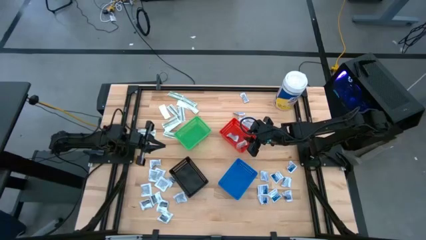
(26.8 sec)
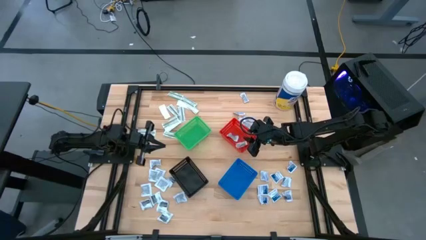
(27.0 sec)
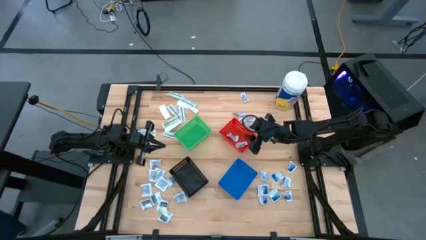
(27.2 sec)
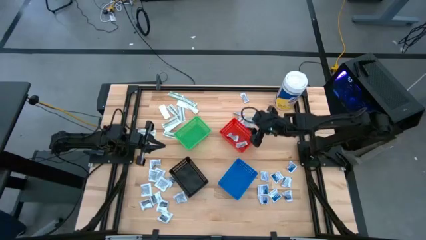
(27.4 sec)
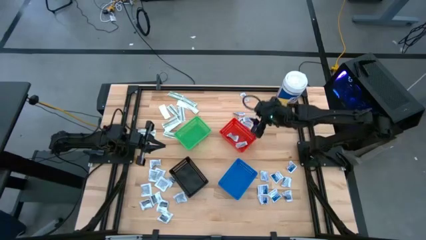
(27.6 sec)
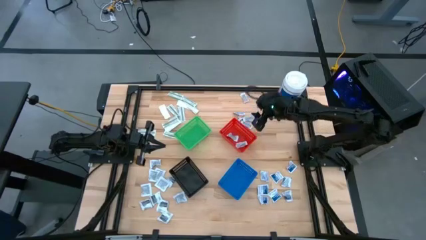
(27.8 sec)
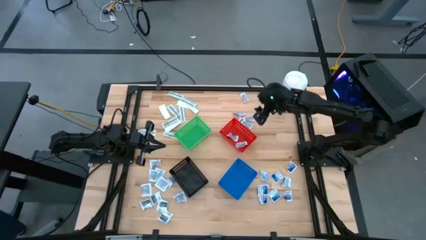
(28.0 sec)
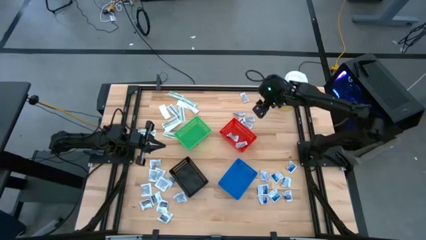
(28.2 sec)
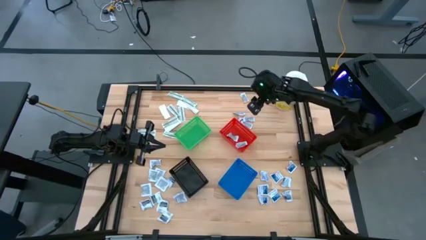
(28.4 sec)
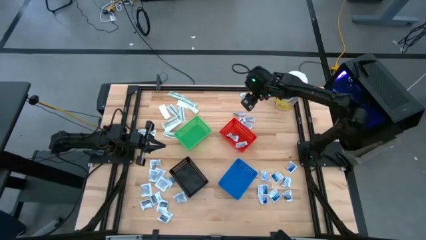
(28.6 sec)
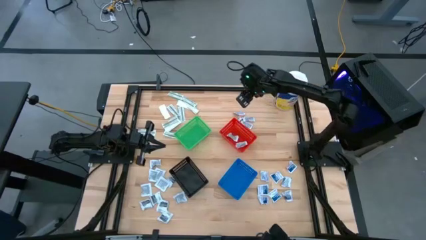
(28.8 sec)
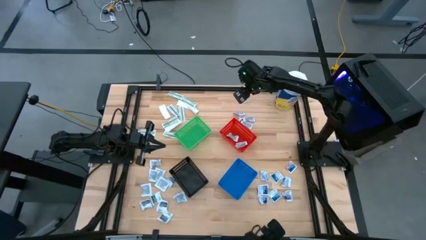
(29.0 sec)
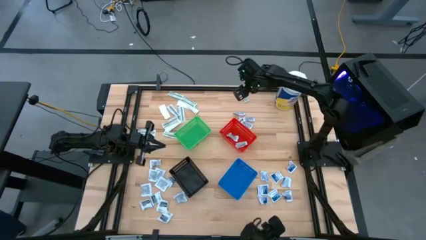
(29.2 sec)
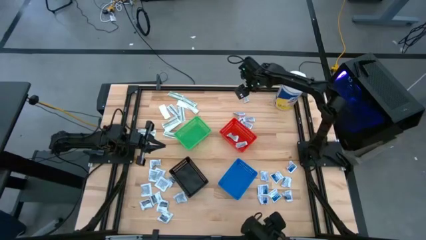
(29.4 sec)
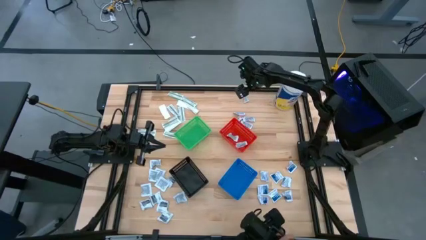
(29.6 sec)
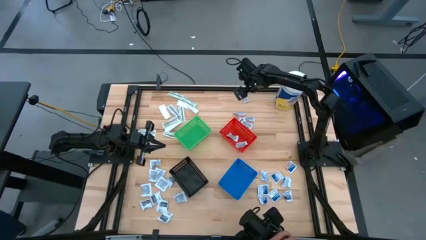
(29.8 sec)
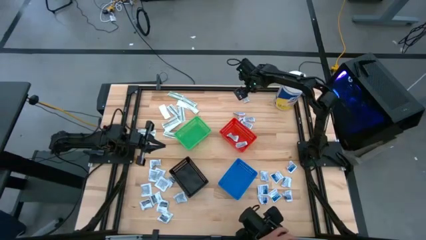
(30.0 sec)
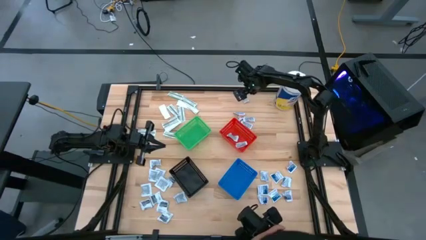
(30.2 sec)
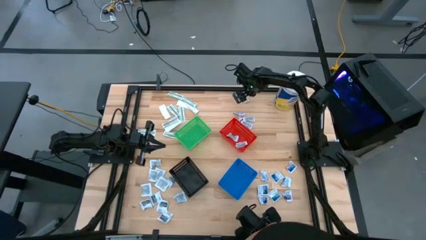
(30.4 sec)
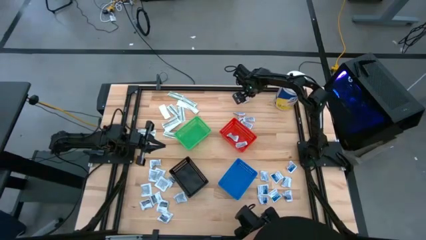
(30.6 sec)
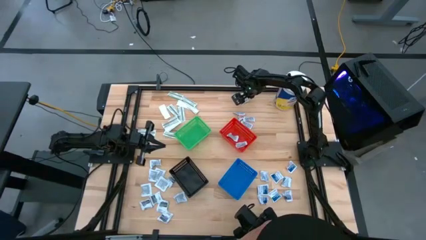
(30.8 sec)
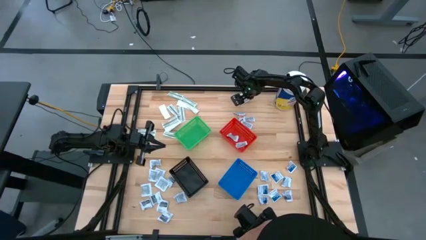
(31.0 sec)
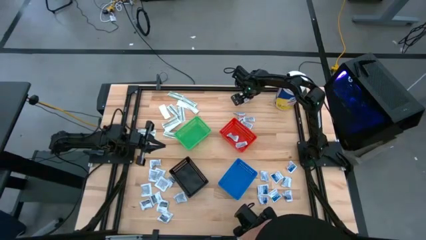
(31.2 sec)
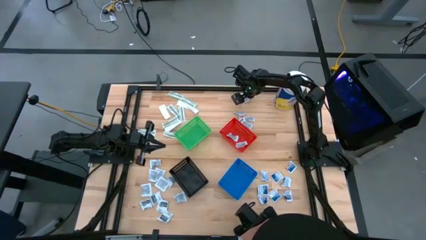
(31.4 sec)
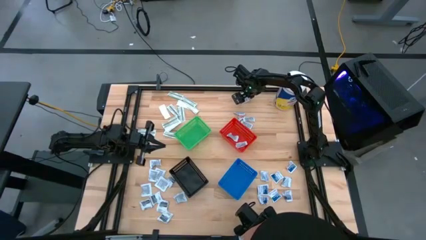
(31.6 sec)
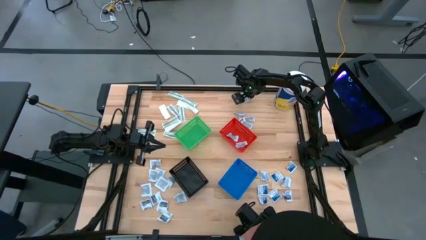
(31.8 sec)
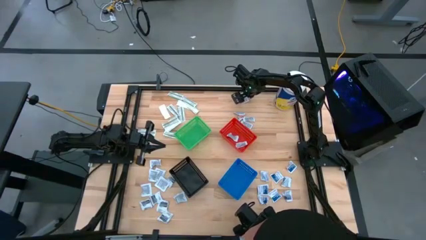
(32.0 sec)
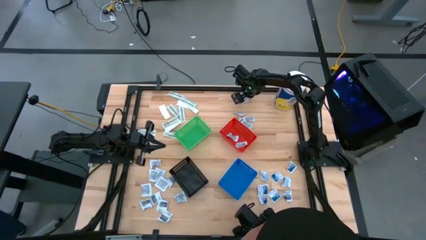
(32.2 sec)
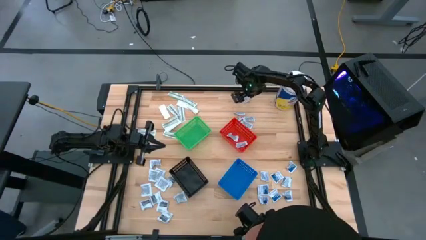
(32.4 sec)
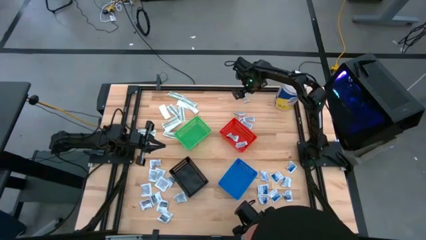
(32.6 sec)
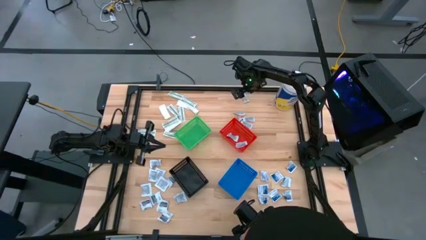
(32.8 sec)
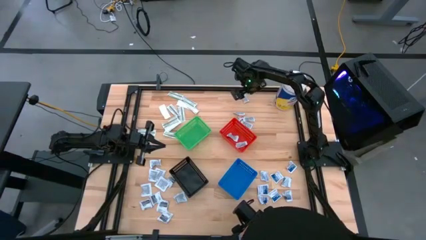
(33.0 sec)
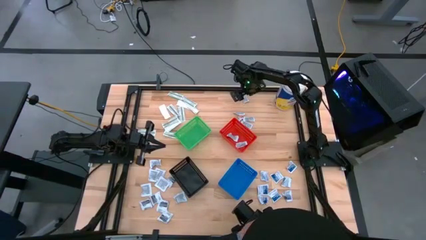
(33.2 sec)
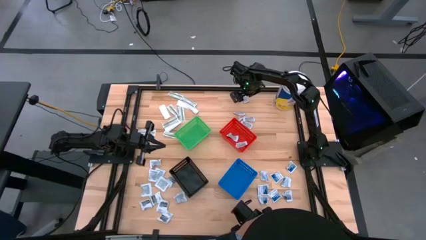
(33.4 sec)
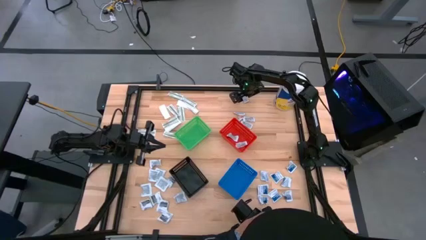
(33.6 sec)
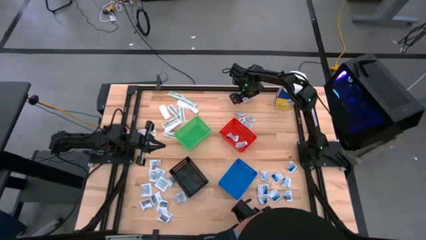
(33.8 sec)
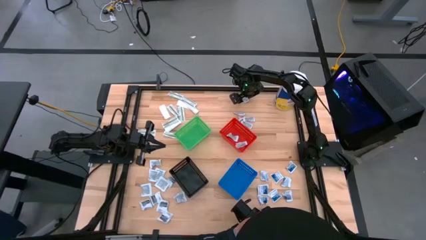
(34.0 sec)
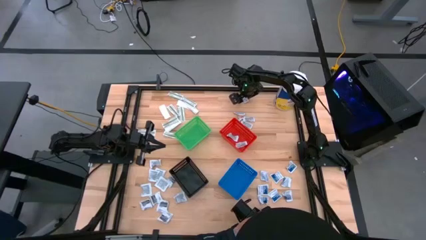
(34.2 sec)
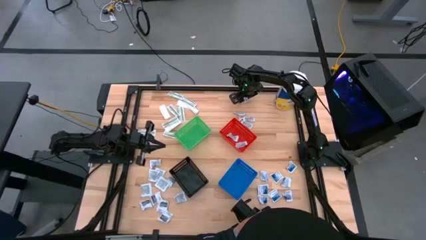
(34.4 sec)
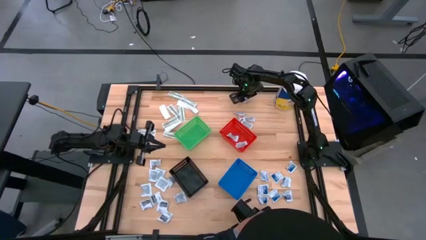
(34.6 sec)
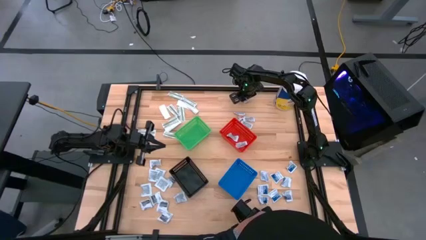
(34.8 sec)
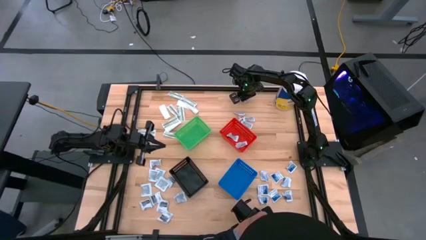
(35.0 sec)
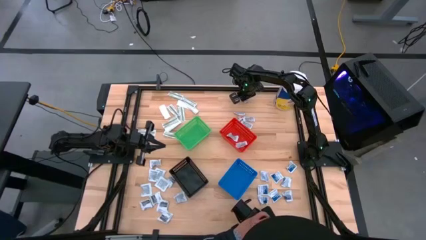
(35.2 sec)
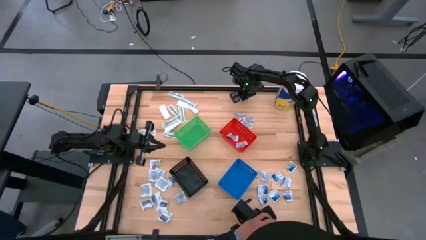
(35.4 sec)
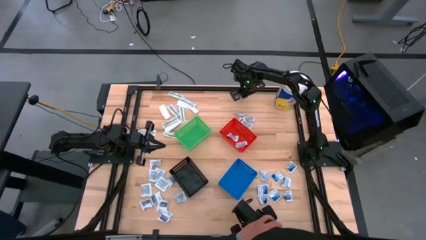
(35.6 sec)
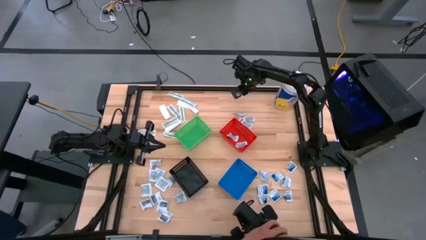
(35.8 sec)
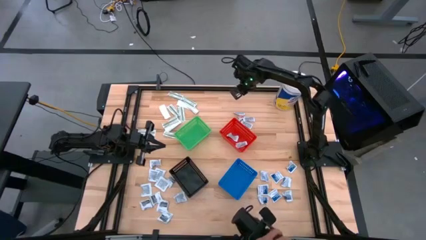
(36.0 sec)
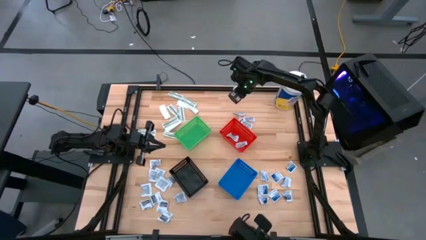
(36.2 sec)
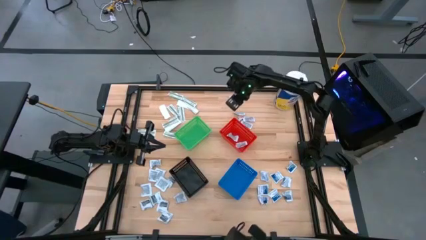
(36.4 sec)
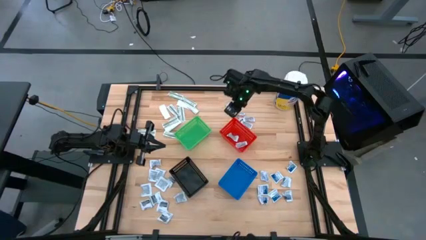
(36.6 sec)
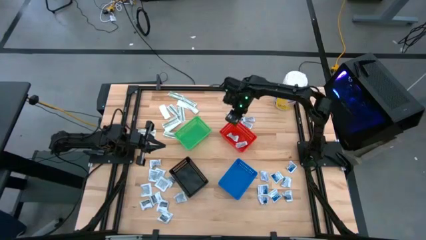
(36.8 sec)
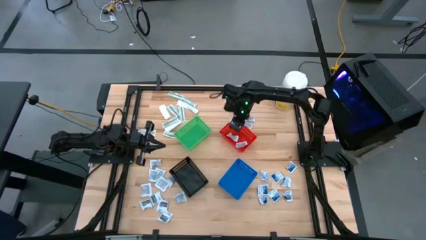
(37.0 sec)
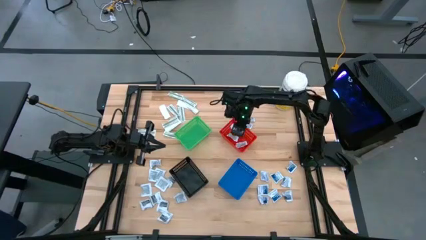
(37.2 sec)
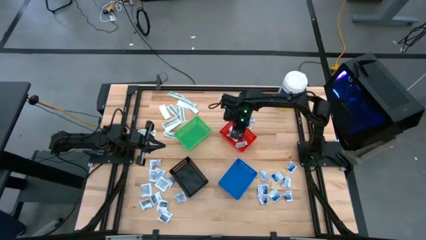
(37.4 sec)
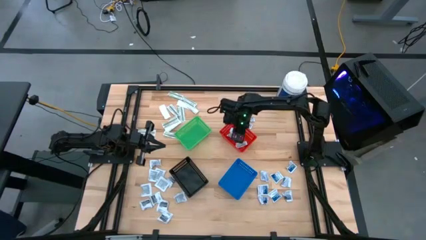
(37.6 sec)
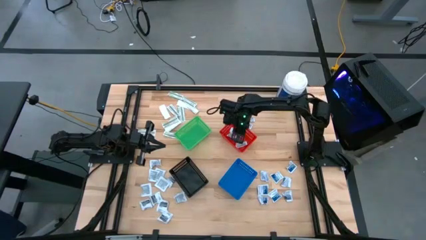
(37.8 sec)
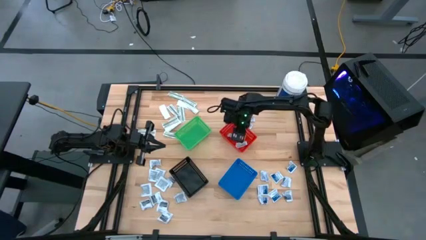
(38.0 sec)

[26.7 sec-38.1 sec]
Task: Pick & Place First Aid Supplies
Put the orange ointment pack into the red bin

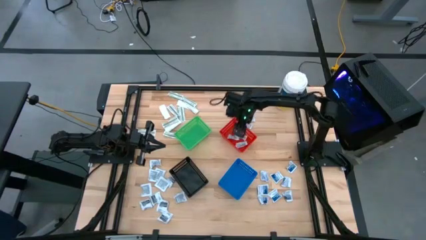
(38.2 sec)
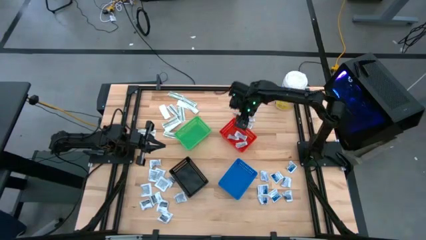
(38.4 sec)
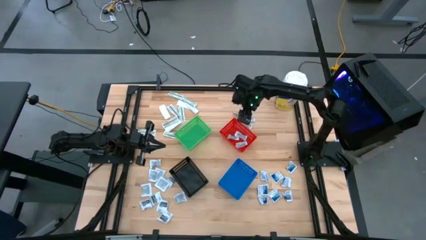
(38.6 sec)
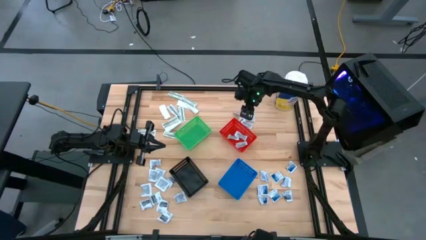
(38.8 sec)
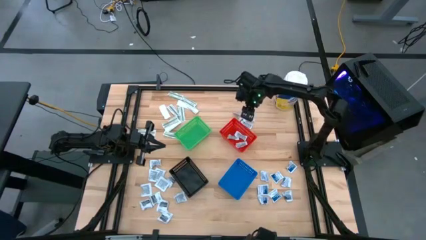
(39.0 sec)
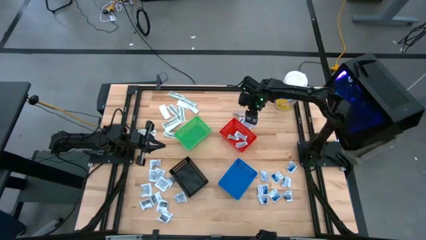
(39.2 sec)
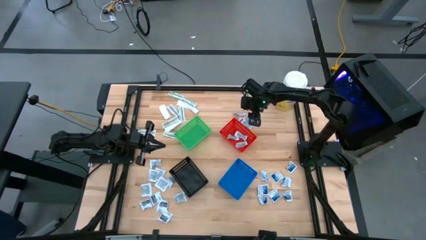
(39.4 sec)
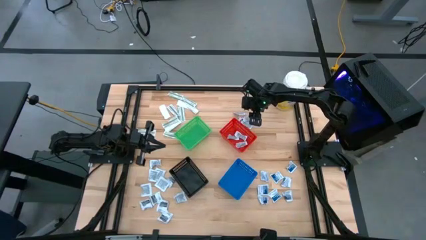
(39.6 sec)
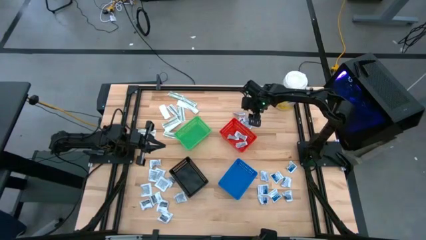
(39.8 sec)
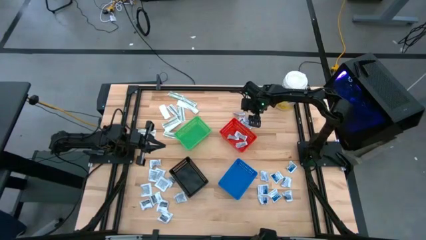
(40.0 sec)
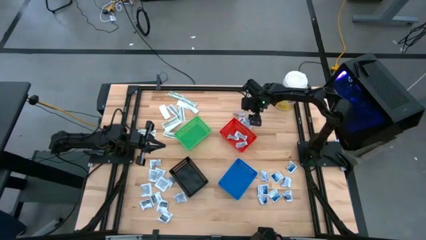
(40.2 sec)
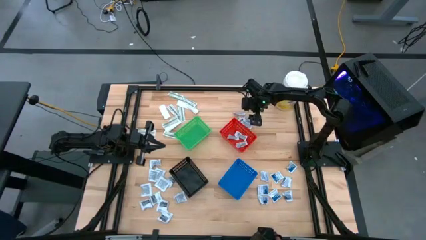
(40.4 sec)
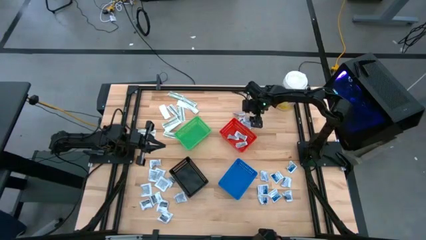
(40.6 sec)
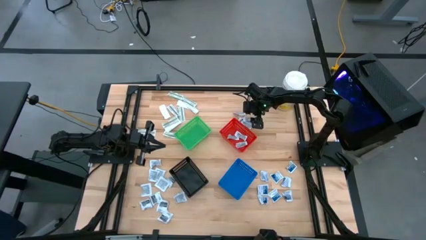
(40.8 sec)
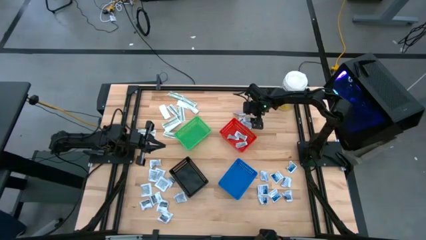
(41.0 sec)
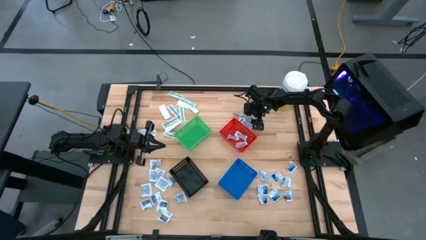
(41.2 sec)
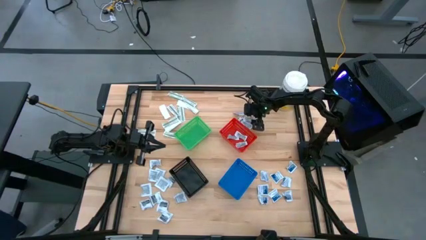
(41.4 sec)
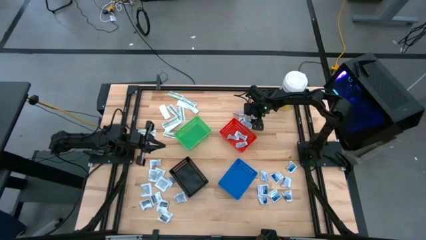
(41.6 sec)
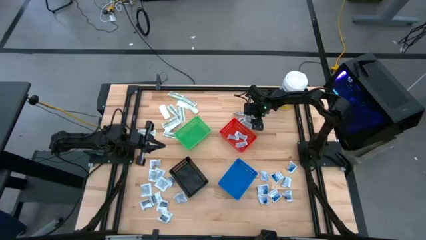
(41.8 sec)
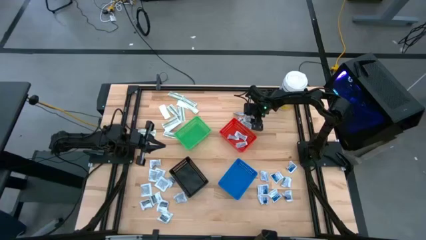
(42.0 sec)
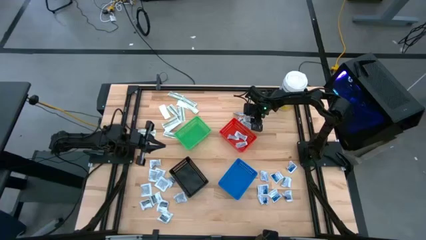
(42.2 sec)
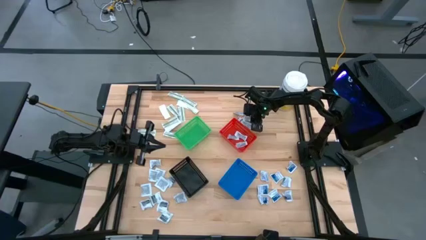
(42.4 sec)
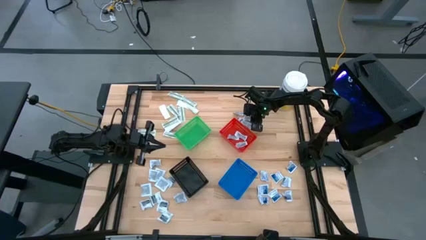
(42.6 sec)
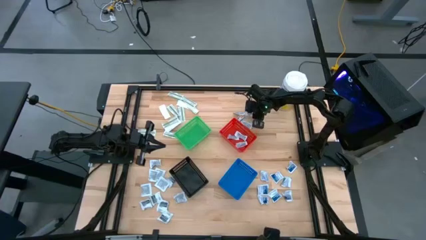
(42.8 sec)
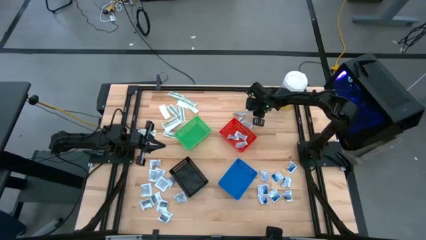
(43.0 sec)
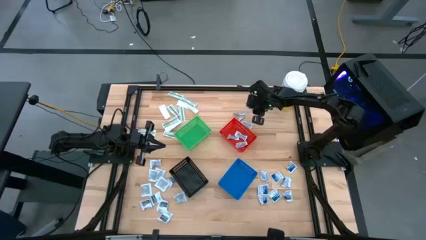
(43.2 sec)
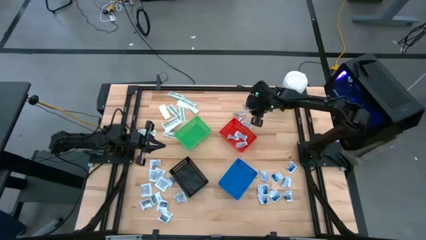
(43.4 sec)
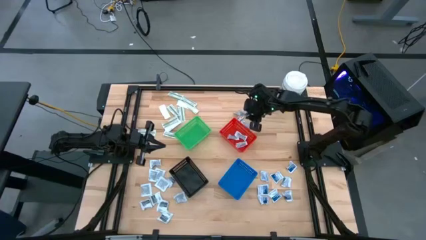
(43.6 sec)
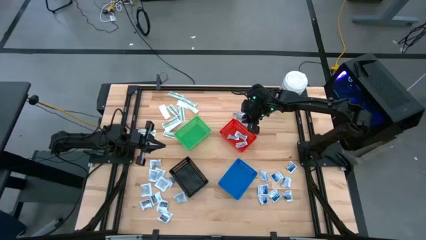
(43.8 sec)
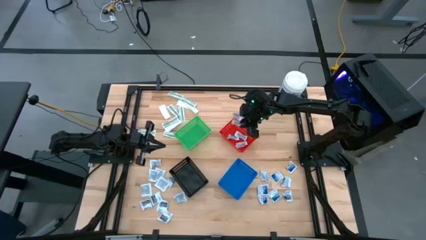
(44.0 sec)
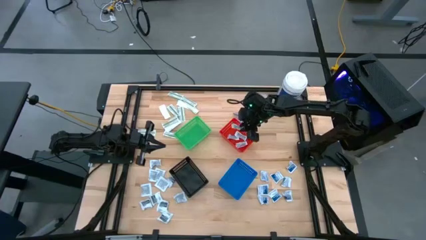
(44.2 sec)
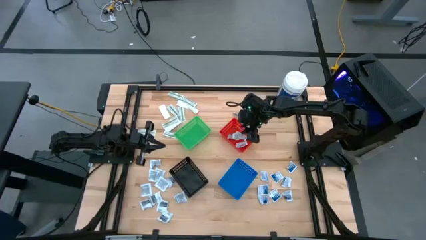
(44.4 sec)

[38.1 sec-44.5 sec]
Put the orange ointment pack into the red bin
